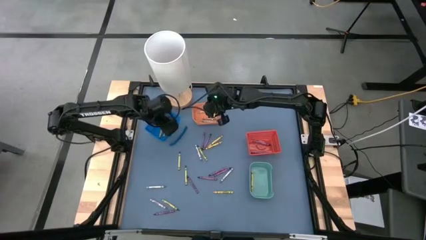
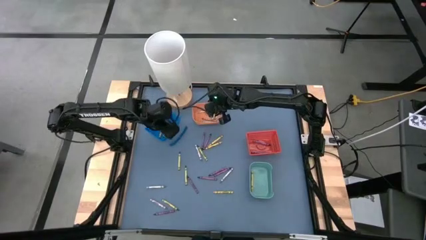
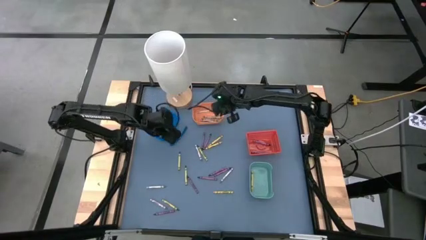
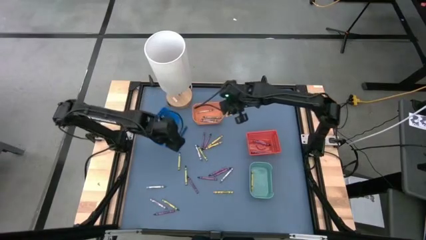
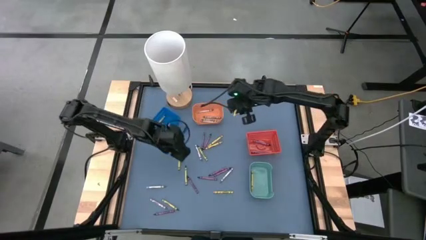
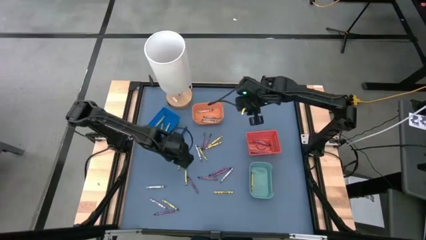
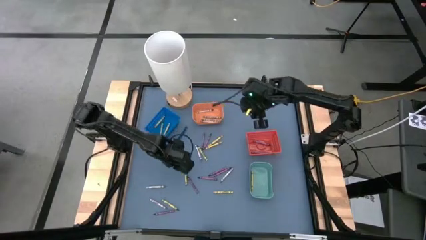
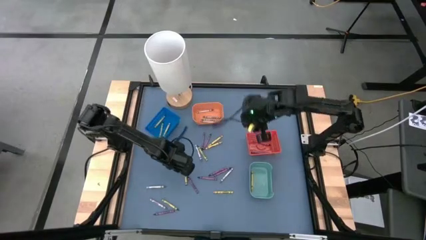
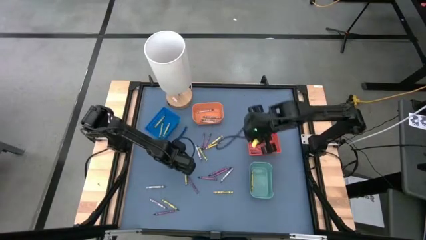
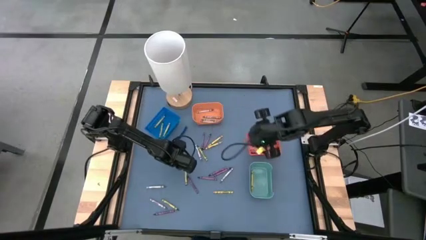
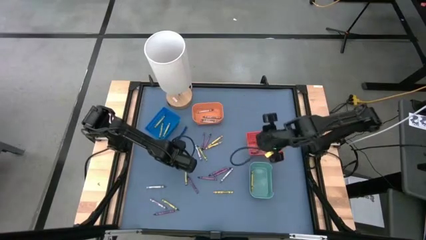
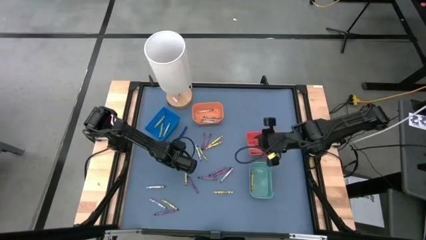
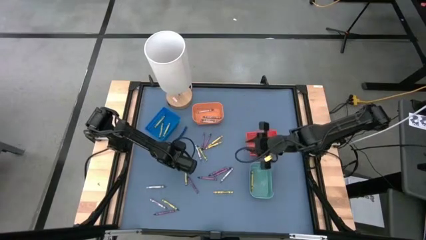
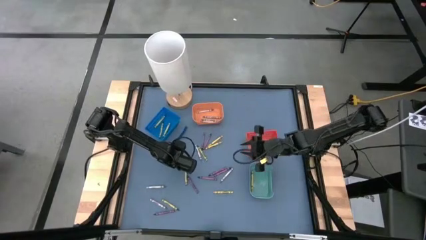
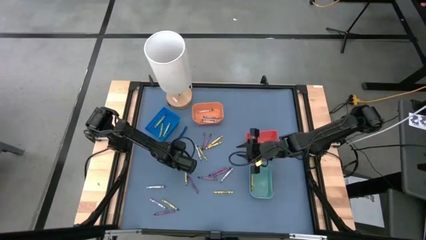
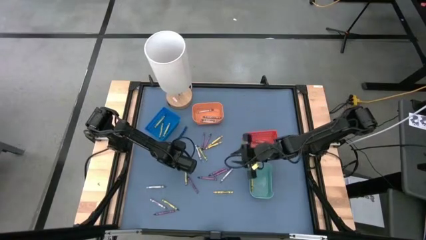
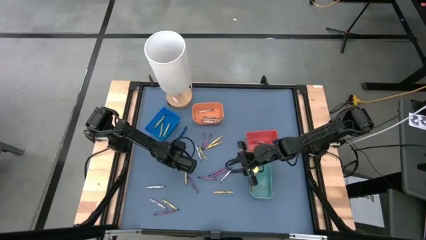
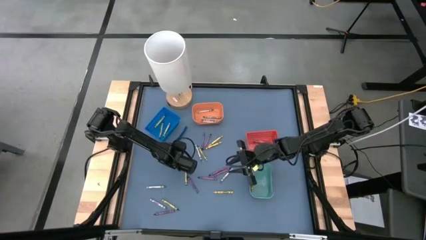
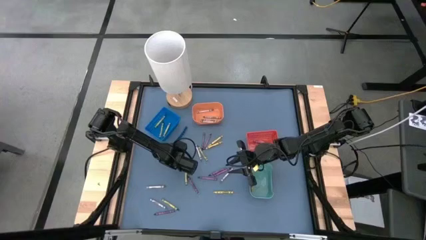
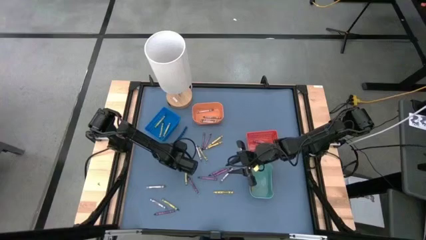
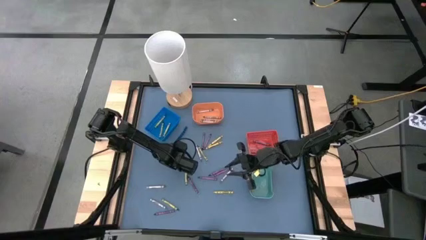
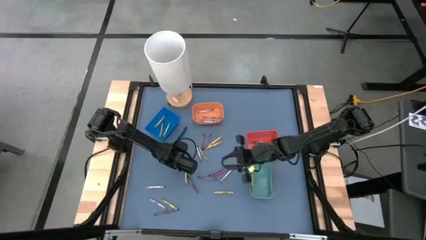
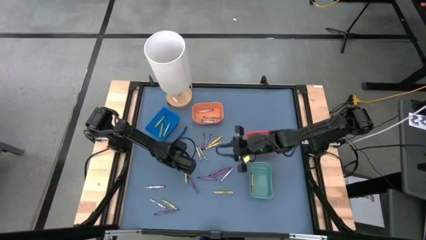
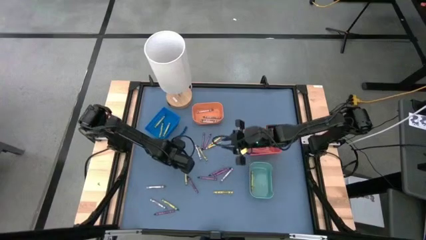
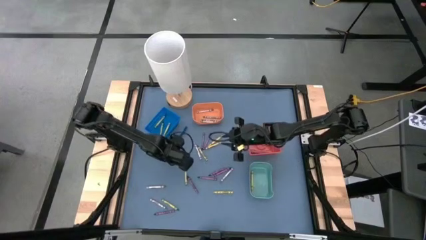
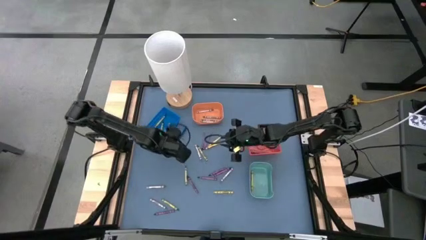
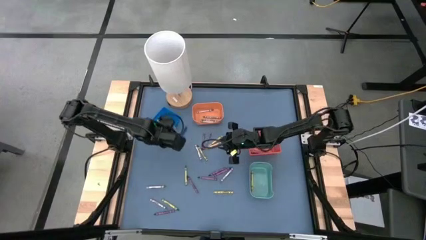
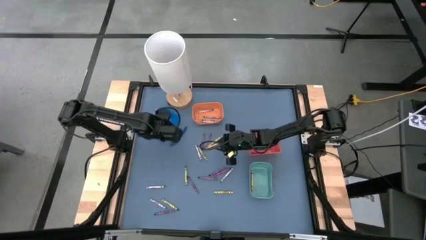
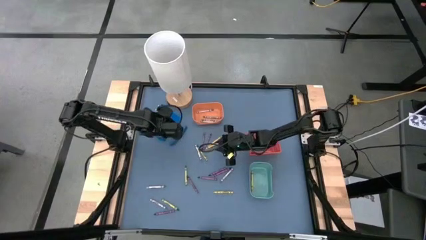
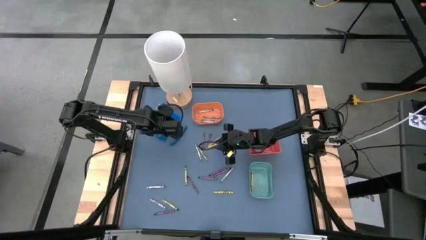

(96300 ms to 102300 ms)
Task: Sort crayons
Put the green crayon into the dark blue bin

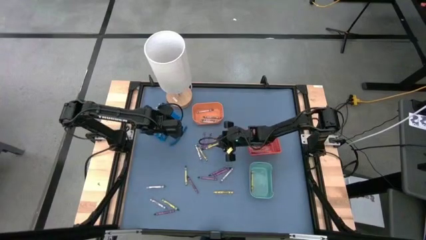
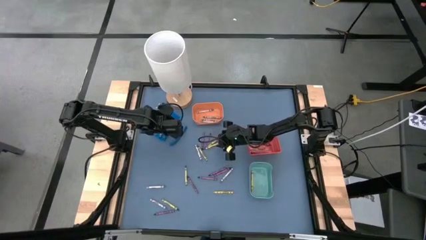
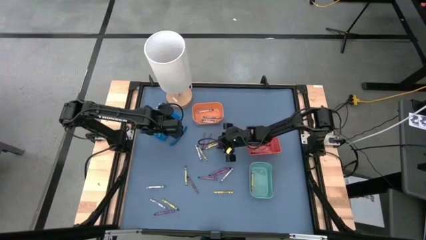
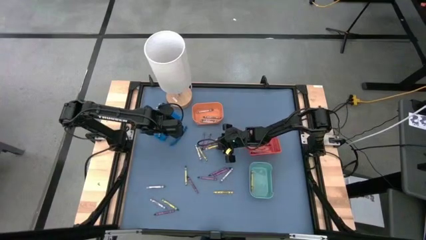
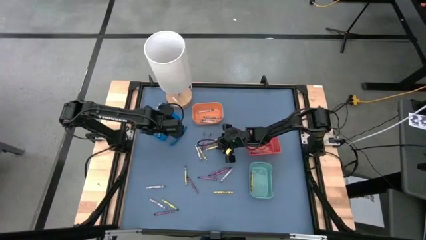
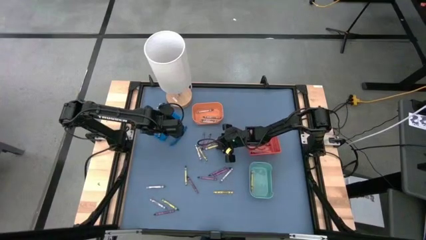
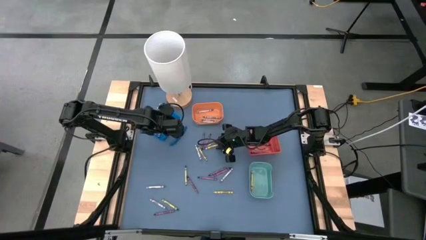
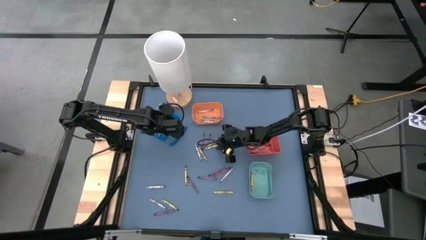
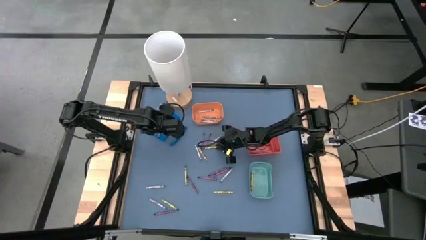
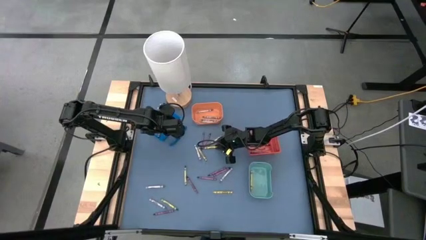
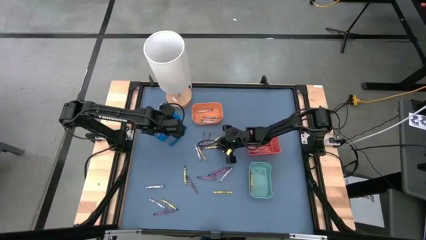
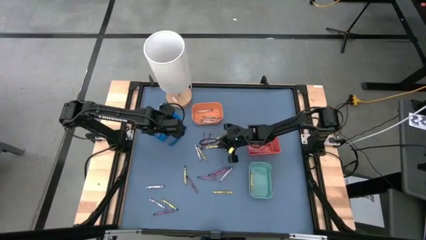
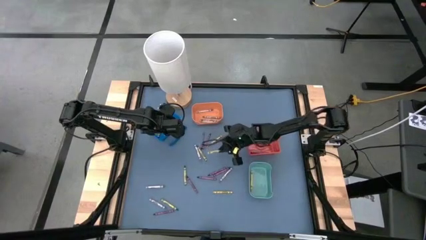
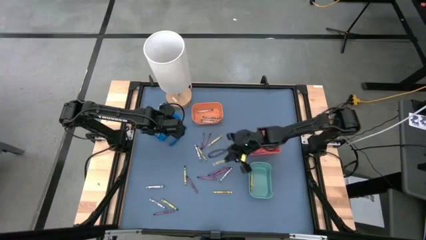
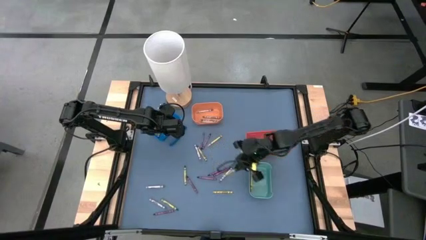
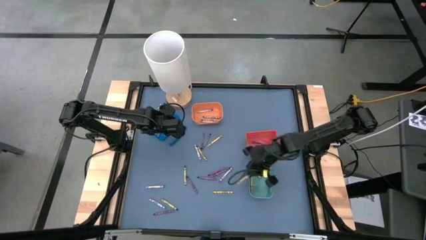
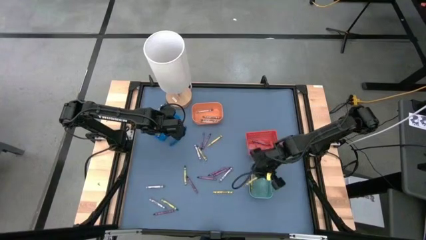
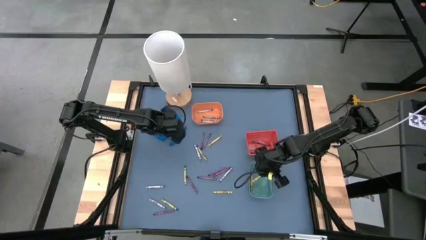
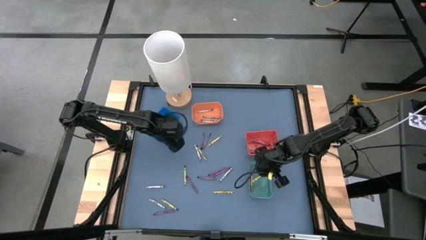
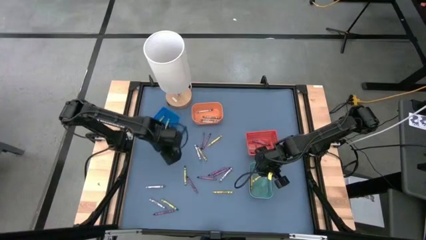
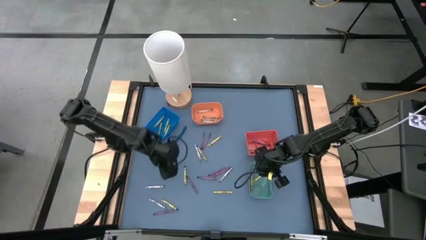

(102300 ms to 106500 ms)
Put the yellow crayon into the light blue bin

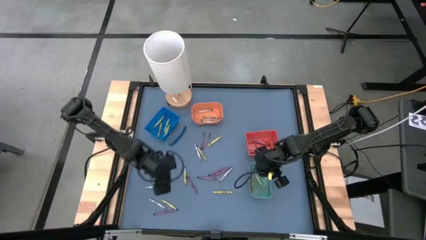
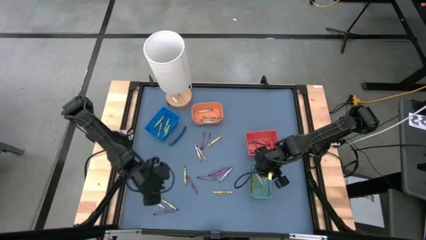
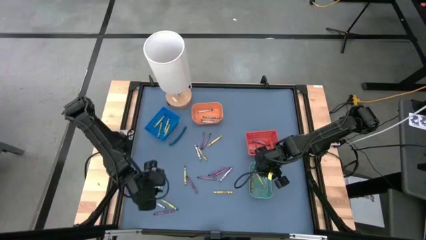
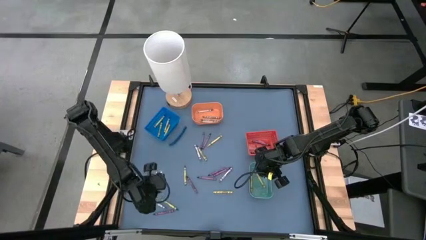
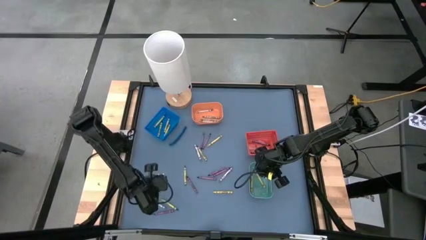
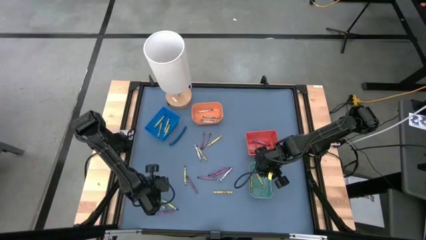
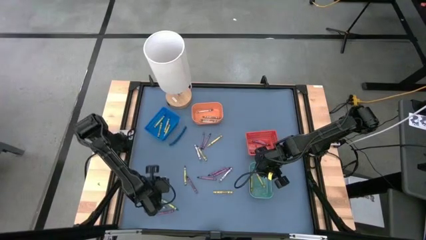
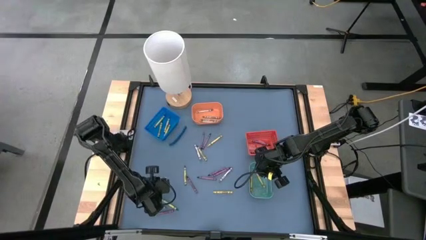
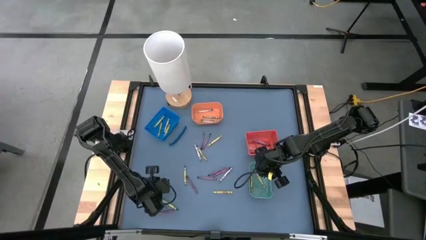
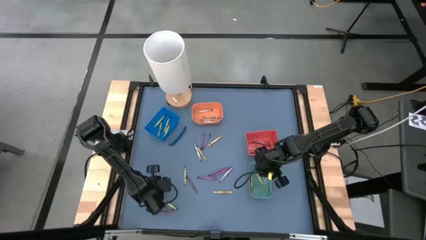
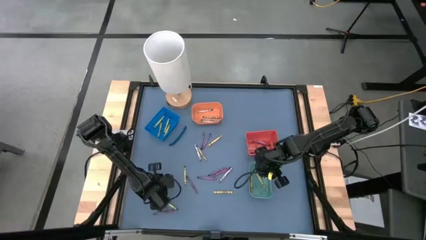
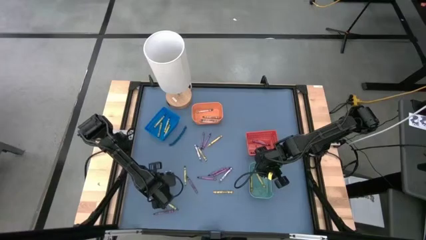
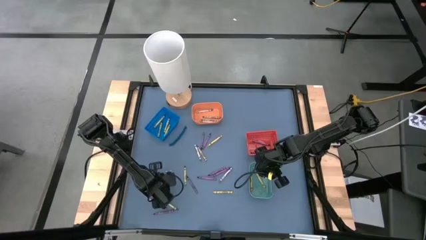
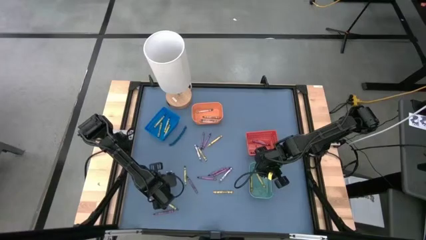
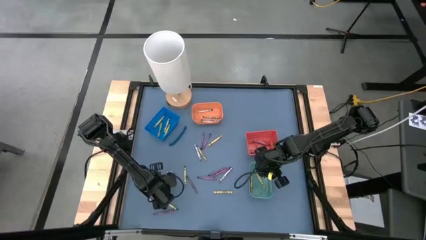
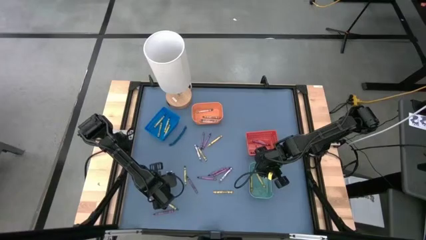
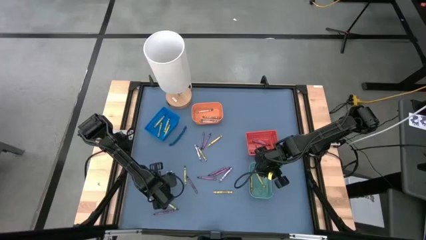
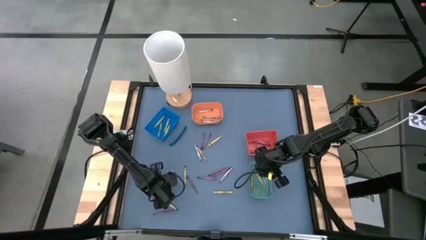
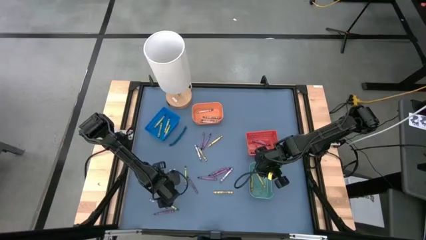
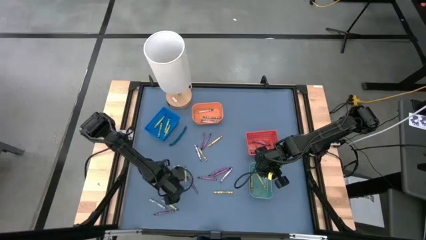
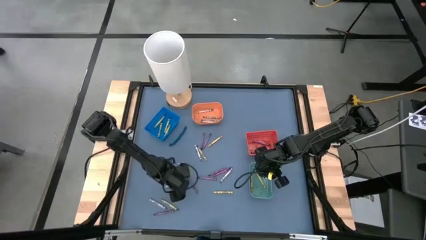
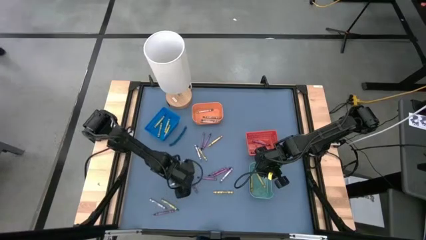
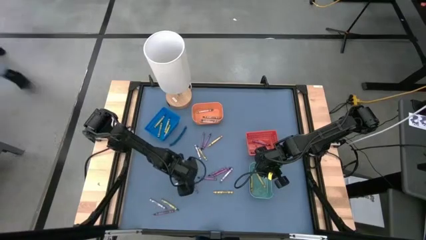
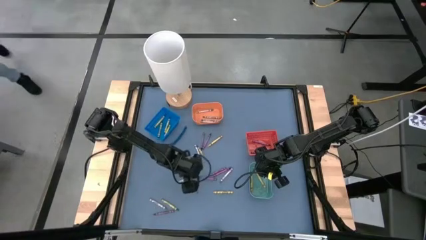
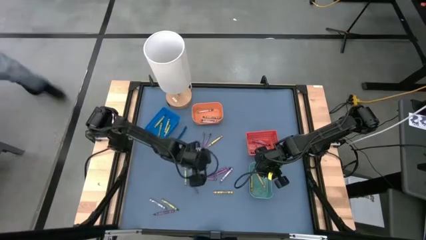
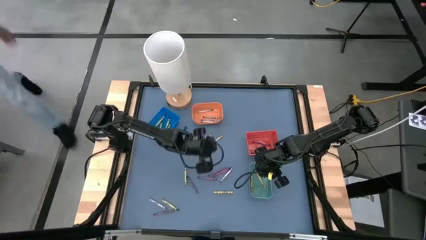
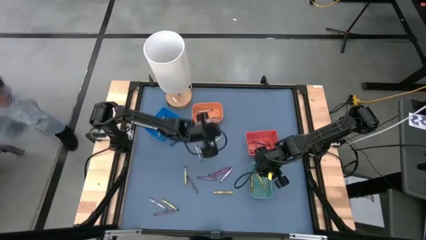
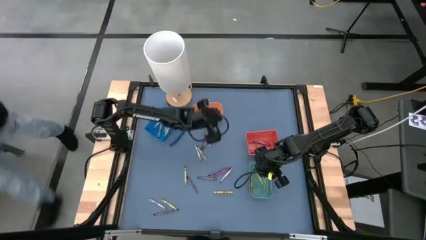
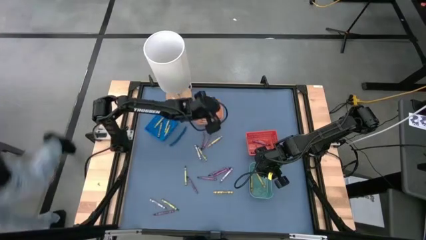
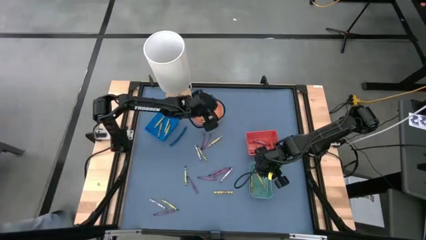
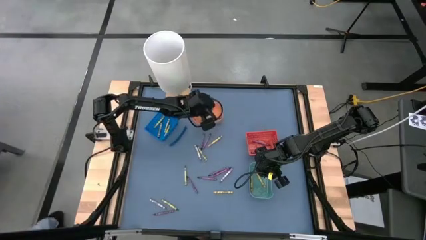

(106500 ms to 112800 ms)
Put the gray crayon into the orange bin
